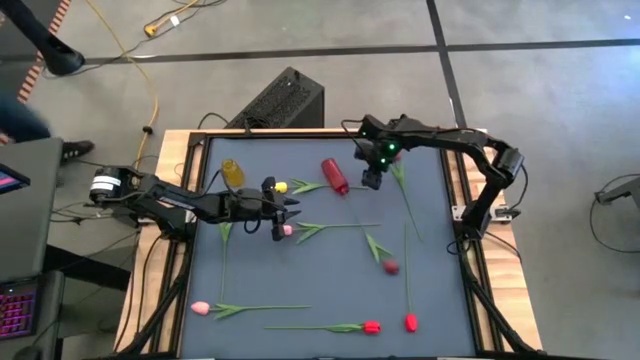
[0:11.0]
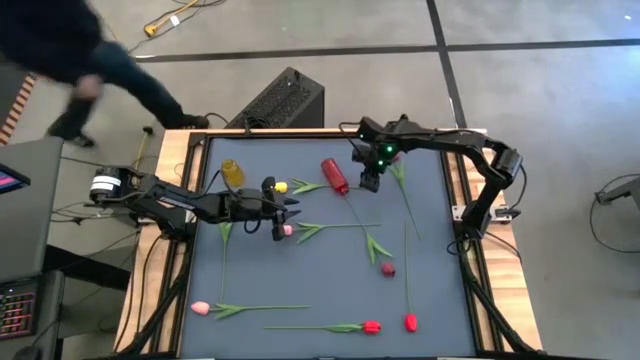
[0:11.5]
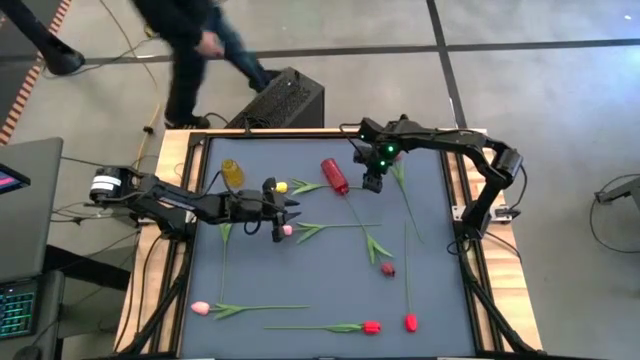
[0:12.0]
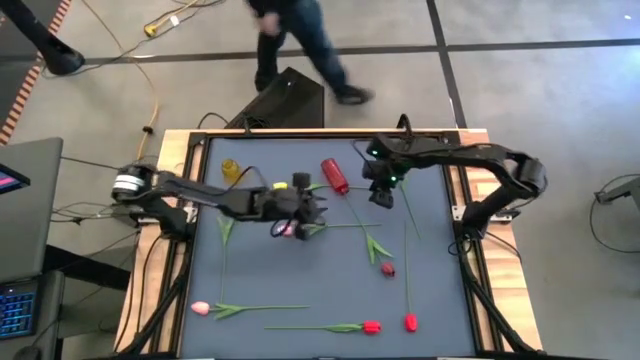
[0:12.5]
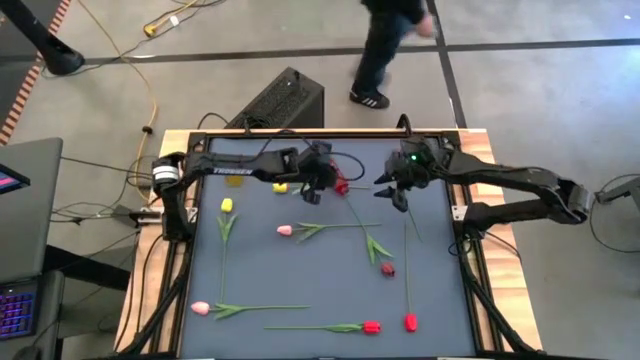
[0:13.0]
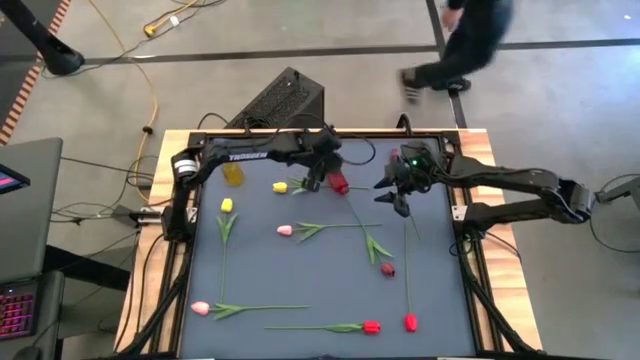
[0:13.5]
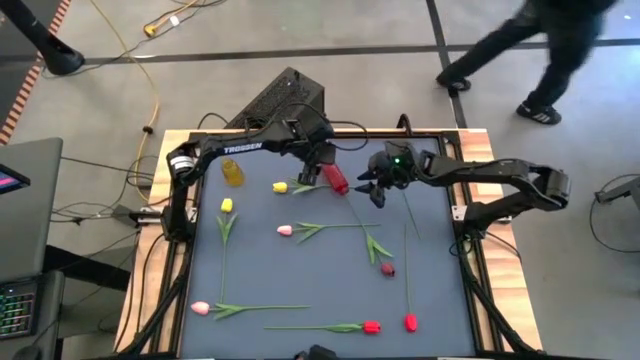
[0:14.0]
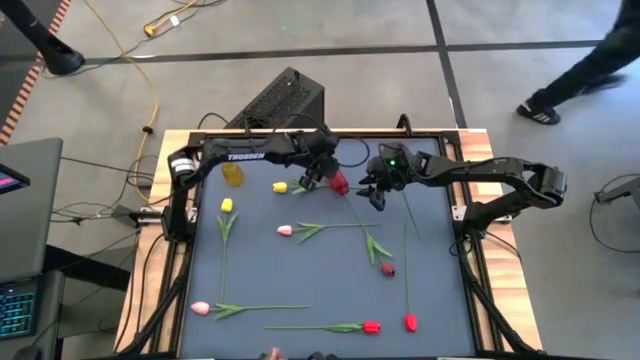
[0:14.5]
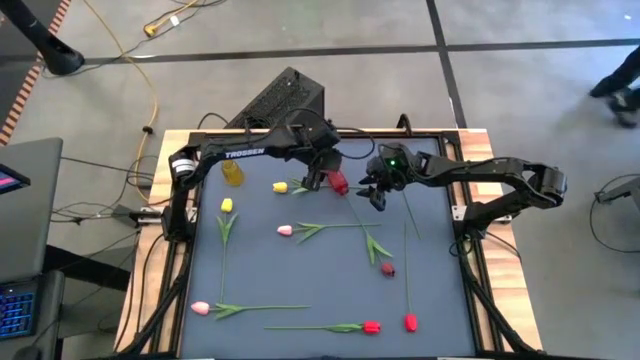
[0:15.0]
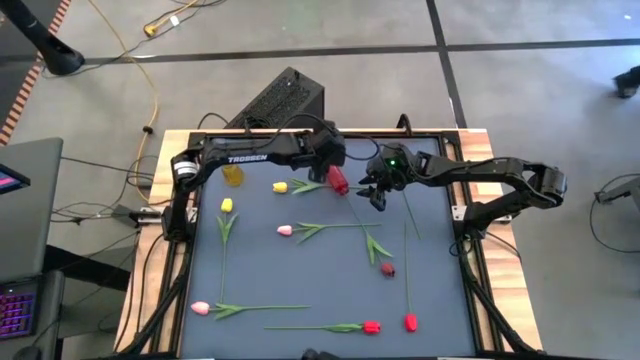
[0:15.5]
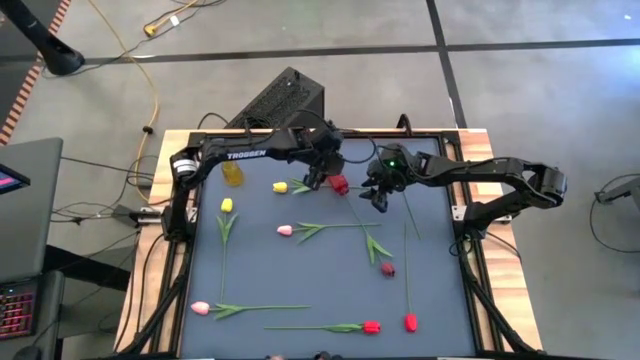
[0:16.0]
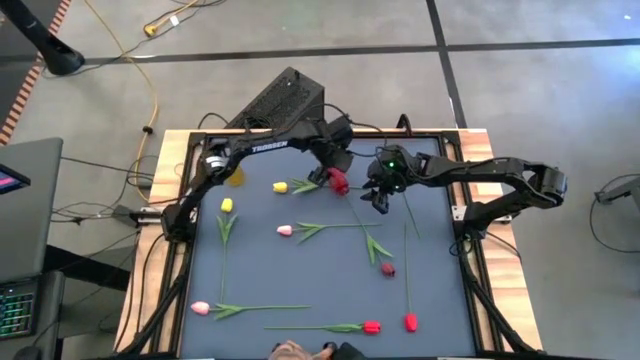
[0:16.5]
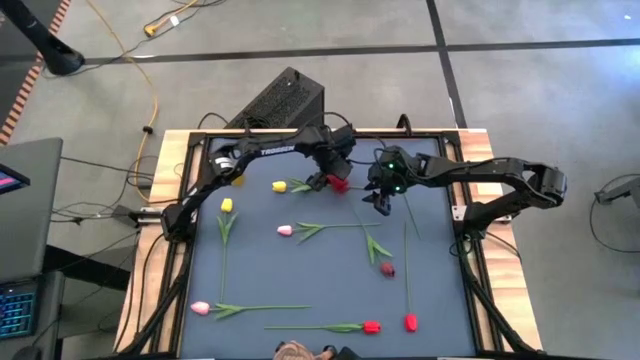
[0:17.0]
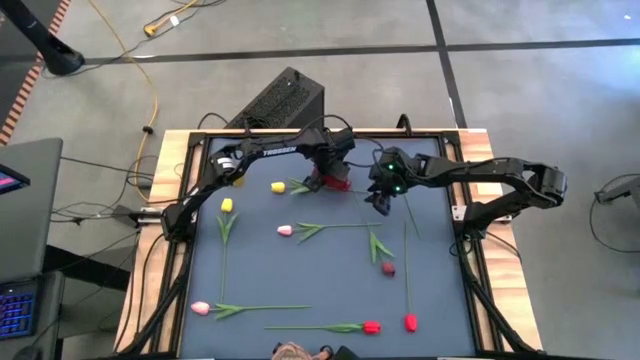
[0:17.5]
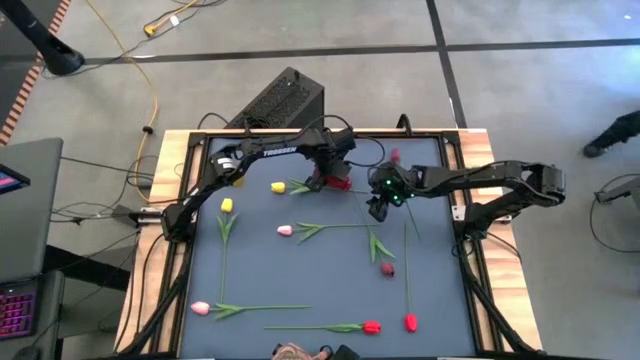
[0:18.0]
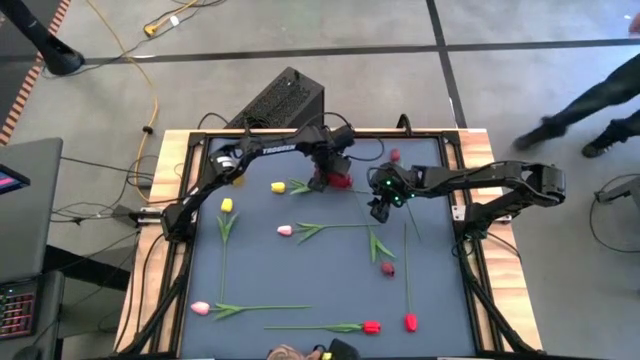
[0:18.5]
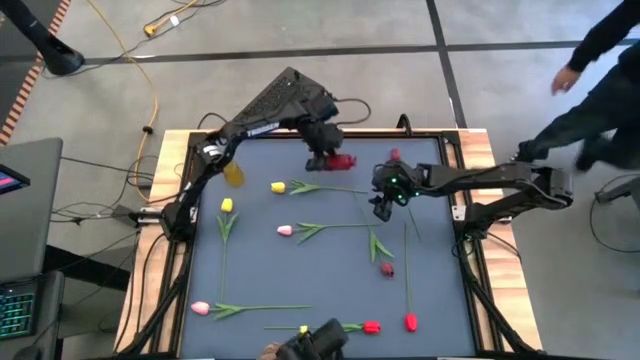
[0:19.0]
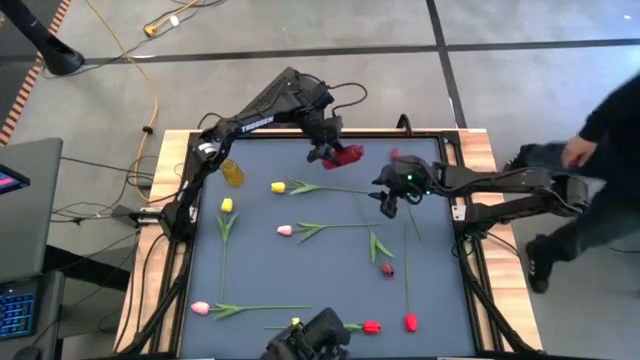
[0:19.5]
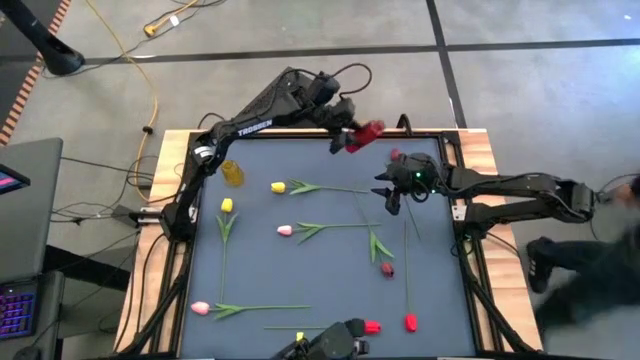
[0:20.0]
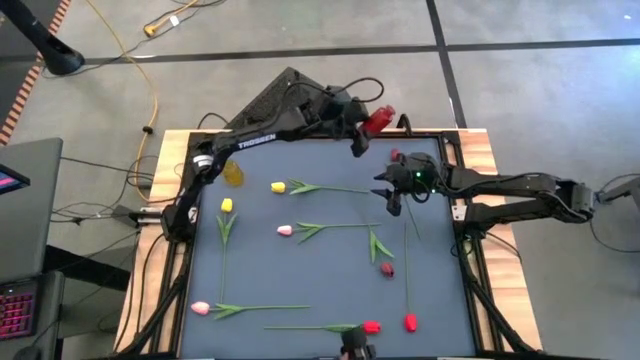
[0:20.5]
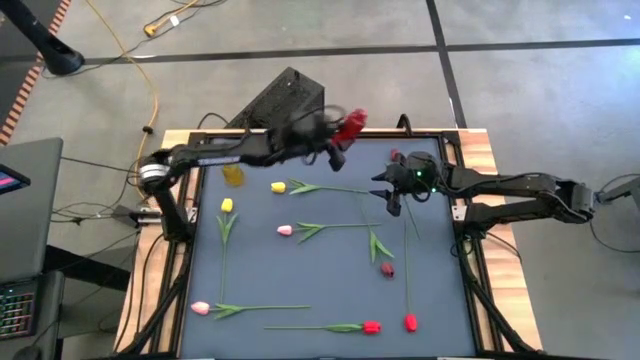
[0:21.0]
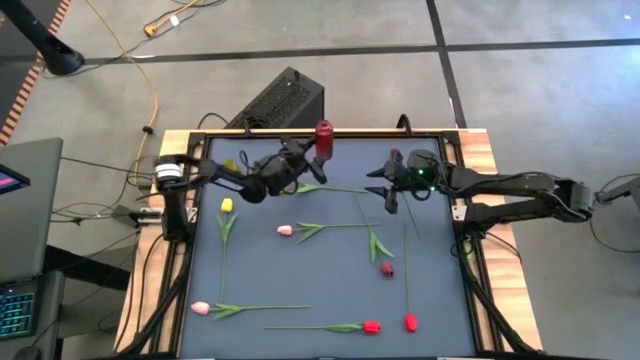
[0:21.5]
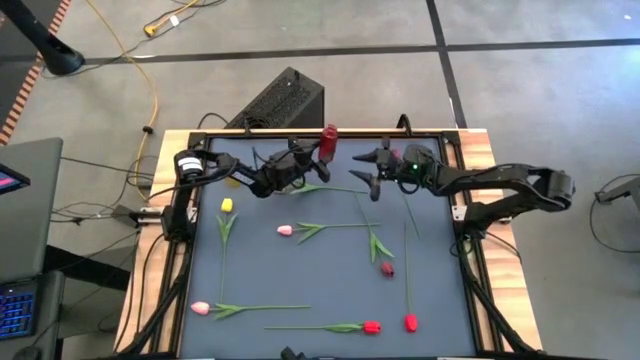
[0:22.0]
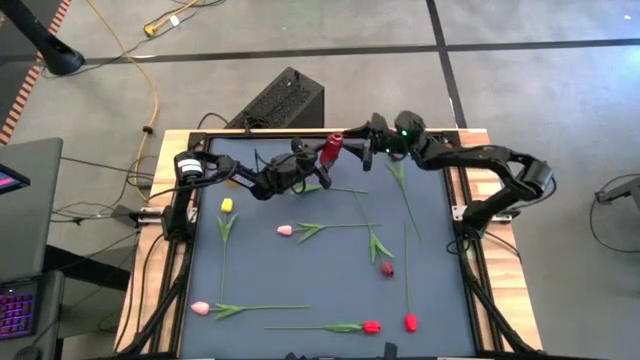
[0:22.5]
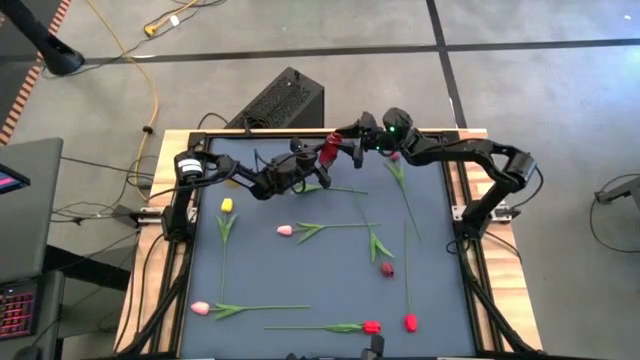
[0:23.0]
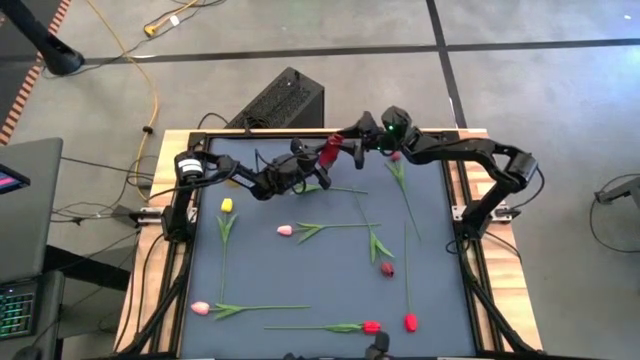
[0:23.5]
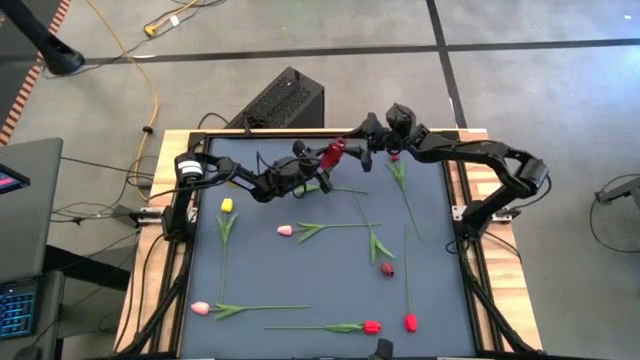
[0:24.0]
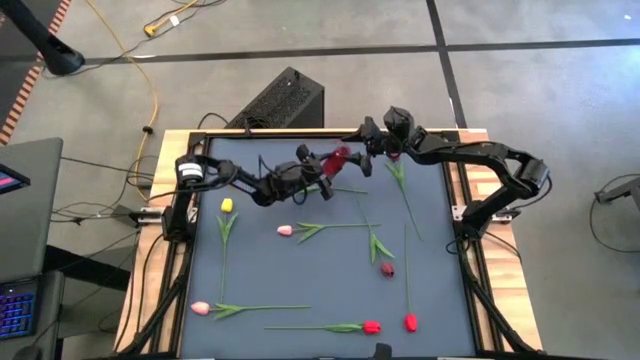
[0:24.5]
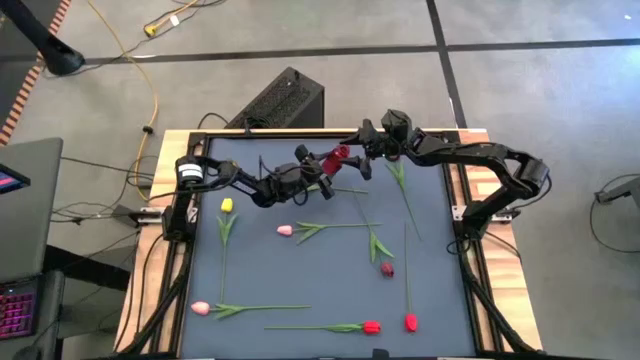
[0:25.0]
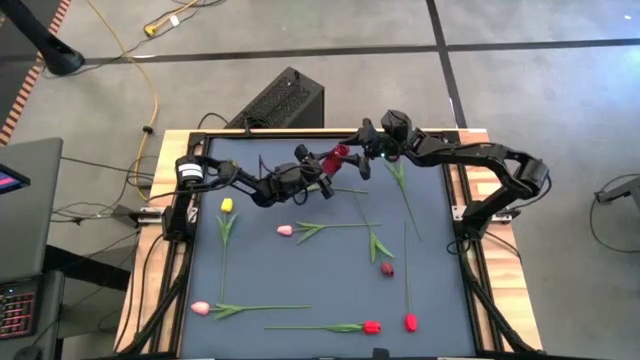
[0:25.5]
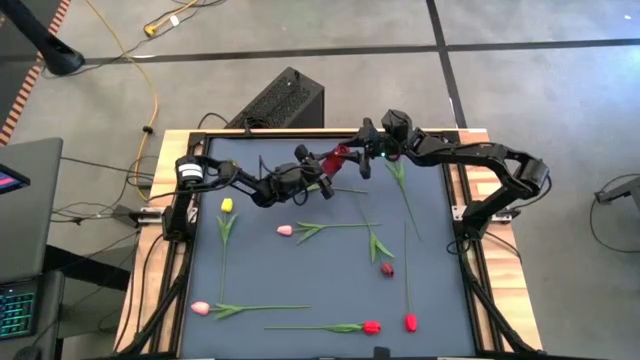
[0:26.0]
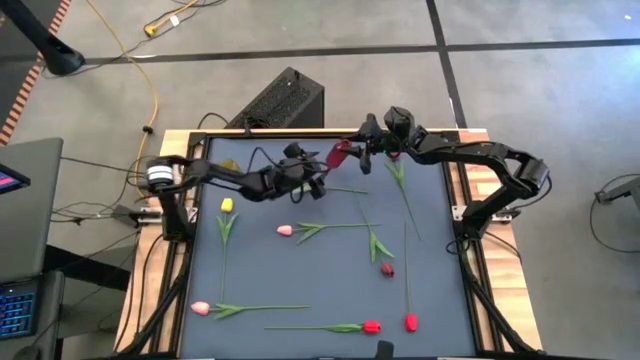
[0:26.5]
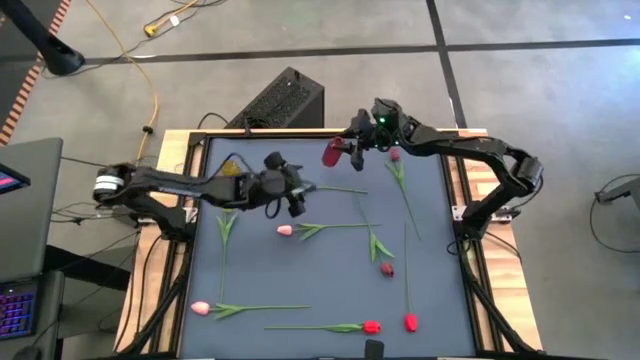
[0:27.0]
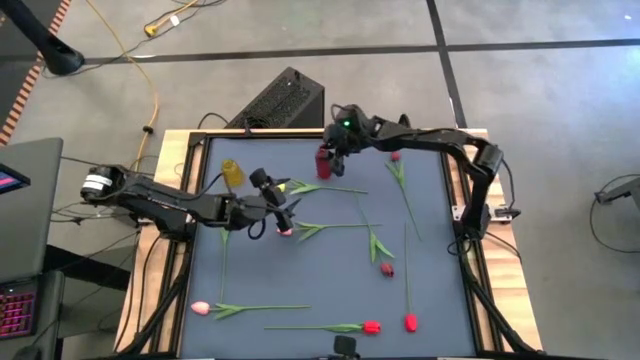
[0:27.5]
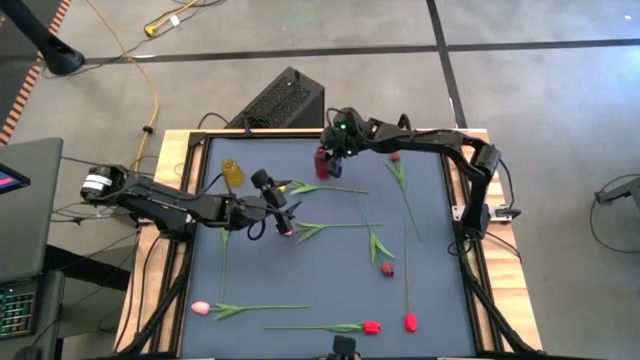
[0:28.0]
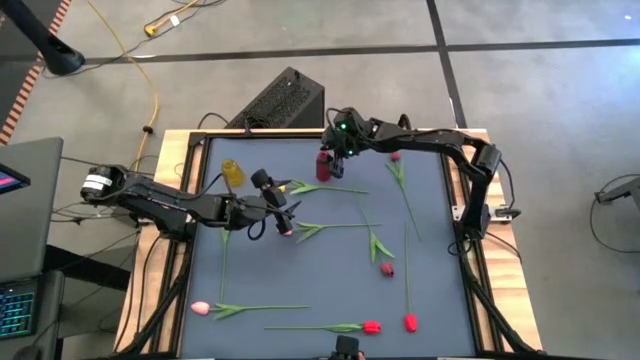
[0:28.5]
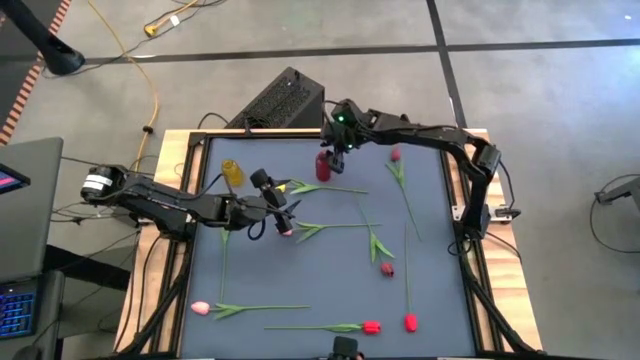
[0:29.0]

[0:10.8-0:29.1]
Task: Sort flowers into vase by color
Adjust the red flower vase
